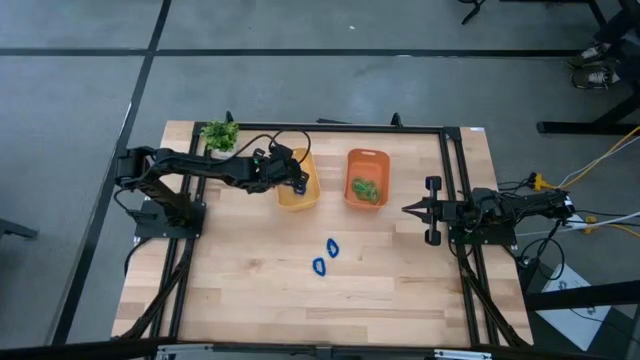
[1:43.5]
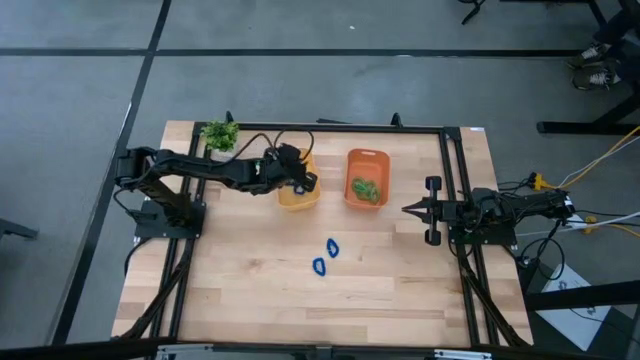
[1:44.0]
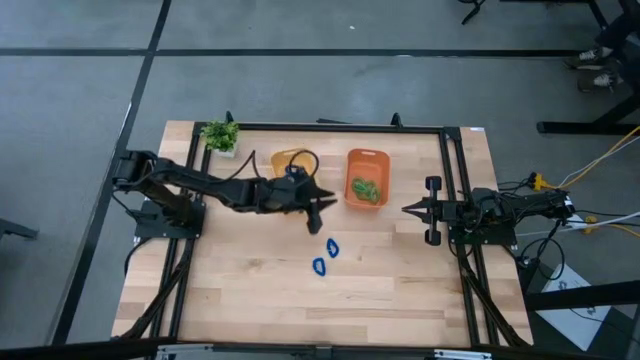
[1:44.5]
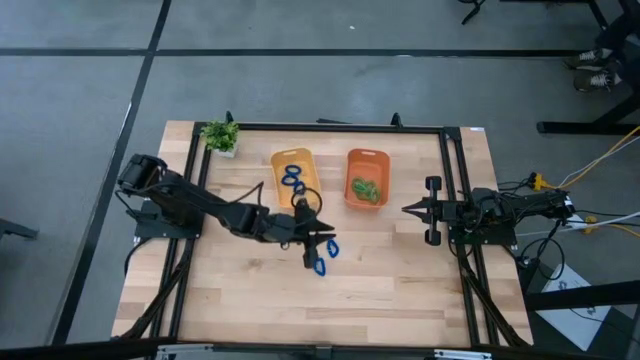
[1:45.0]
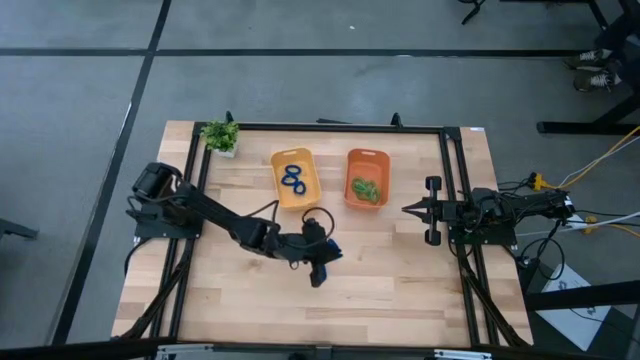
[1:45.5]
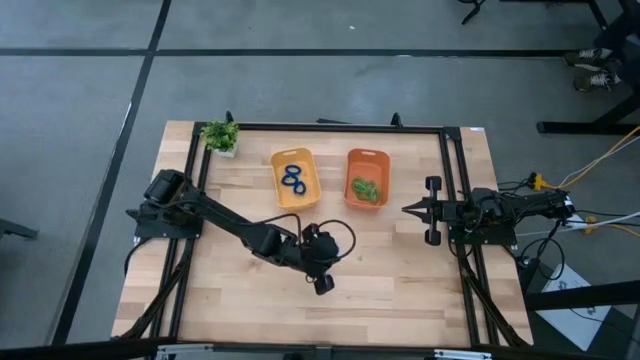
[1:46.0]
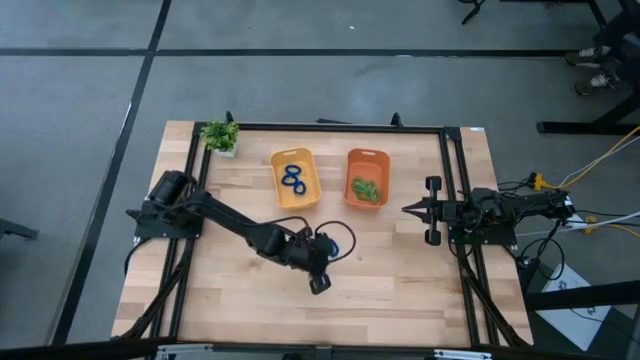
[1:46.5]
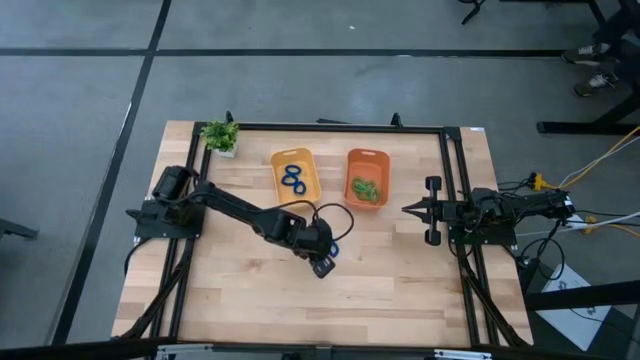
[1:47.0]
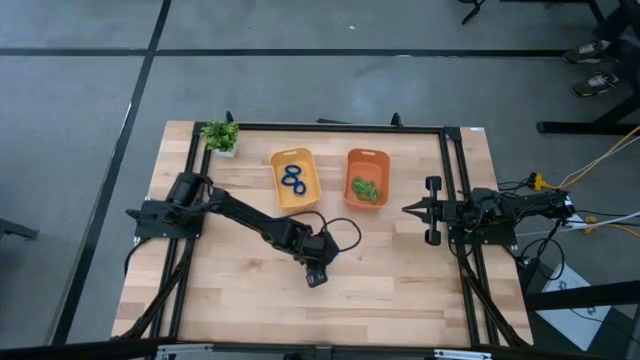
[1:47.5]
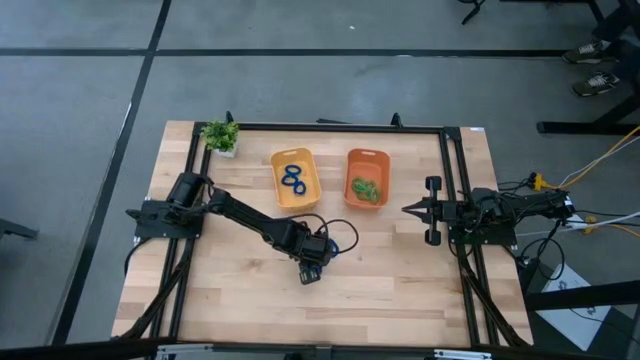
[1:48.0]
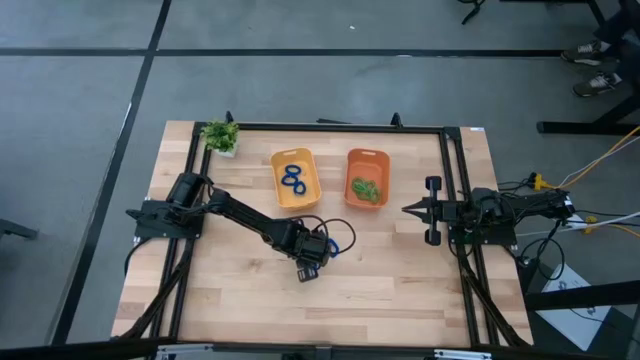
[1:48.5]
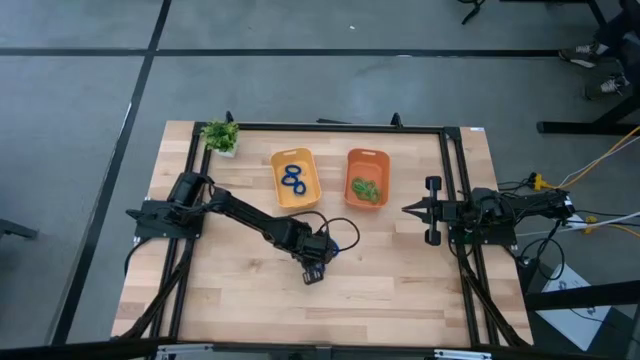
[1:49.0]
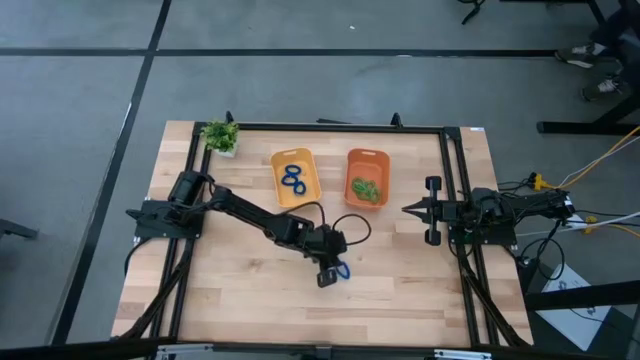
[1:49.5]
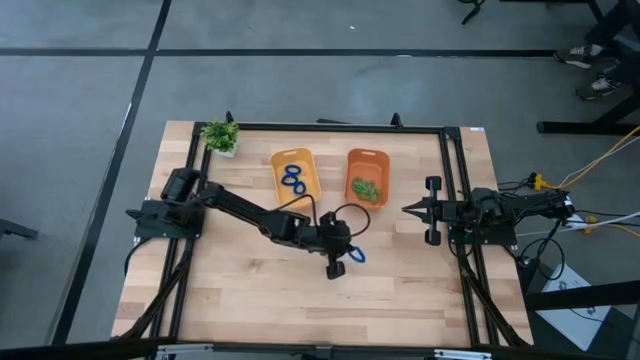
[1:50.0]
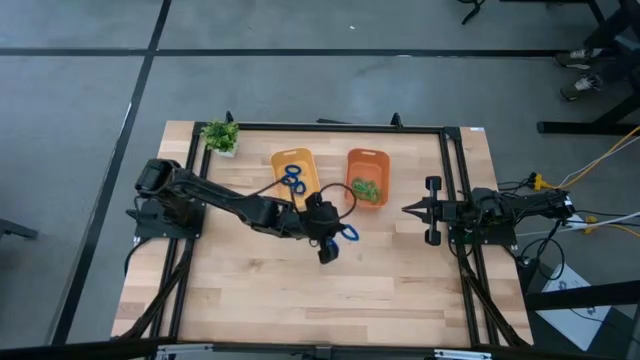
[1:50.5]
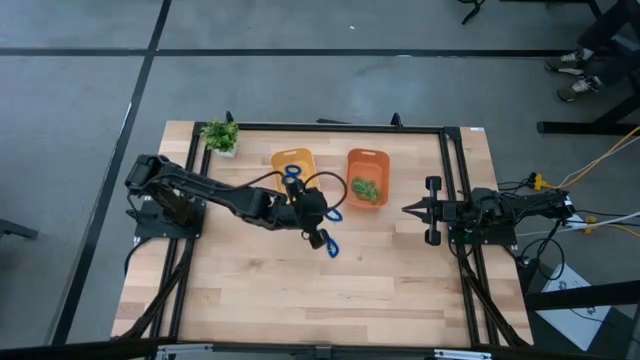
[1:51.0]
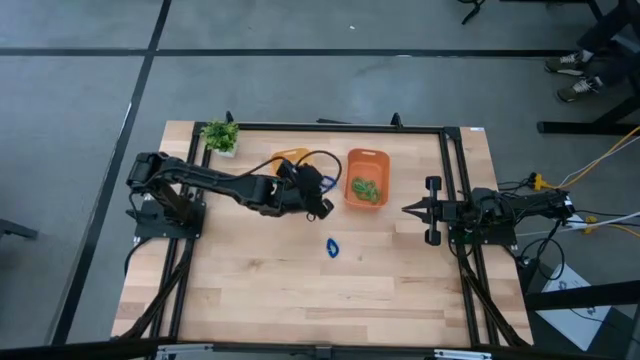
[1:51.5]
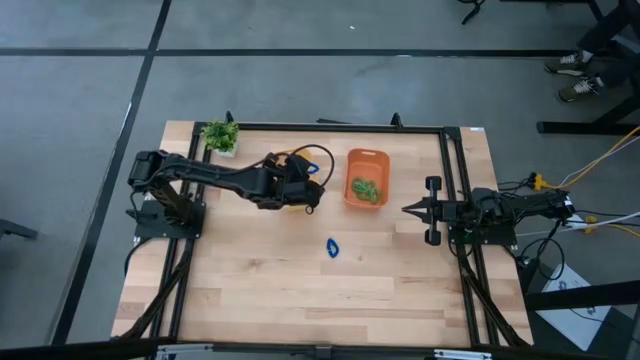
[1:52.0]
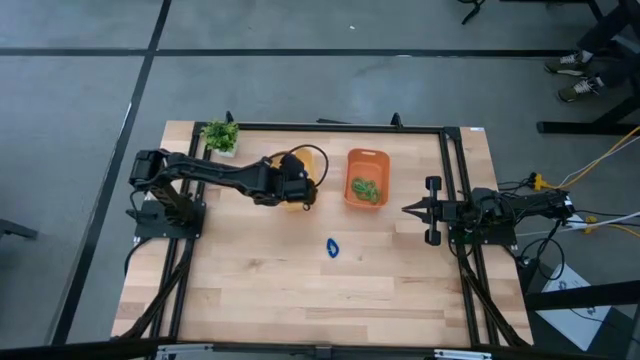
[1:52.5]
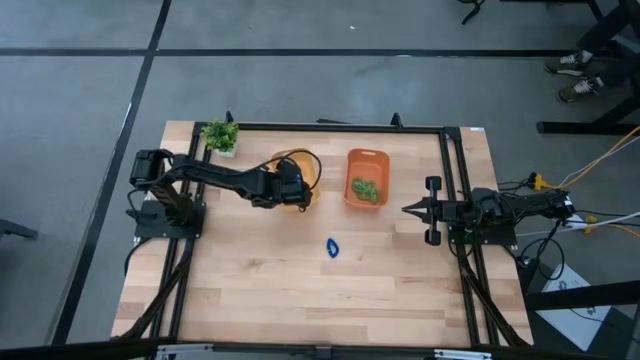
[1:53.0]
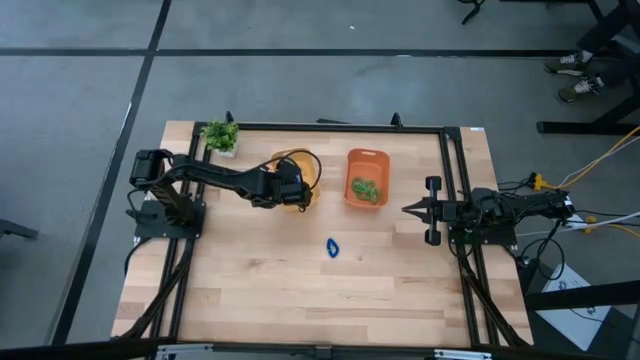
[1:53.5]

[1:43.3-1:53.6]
Task: Sort spring keychains
Put the blue spring keychain into the yellow bin

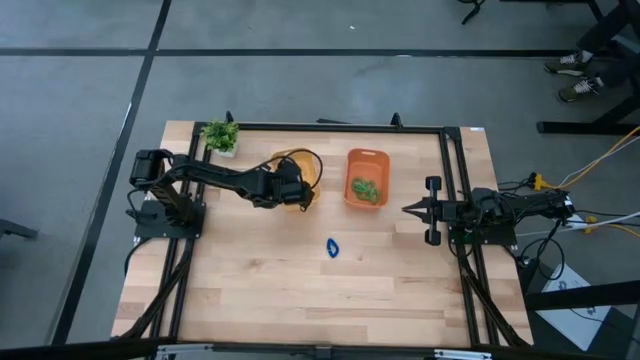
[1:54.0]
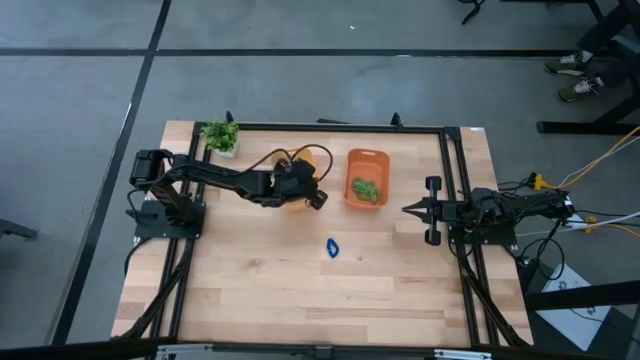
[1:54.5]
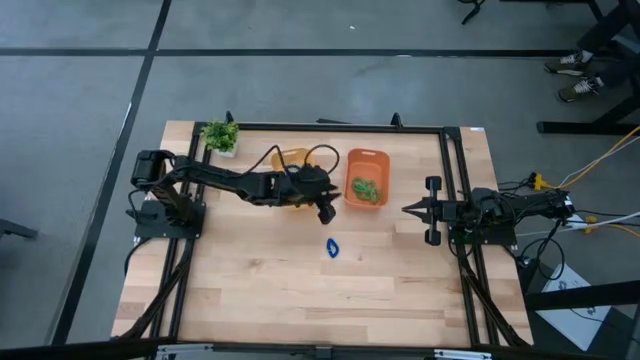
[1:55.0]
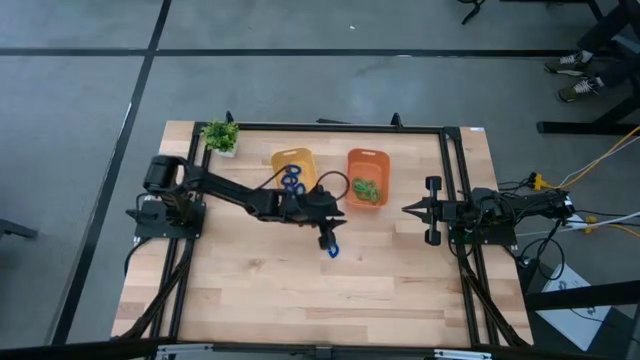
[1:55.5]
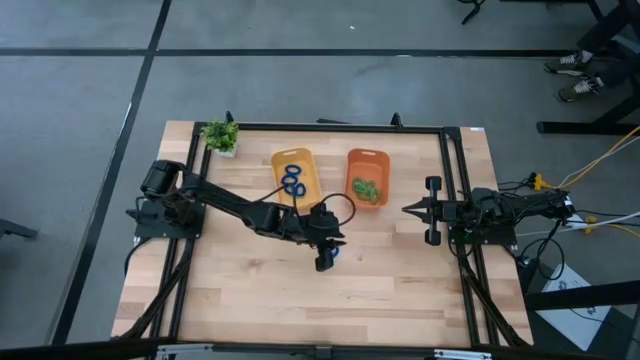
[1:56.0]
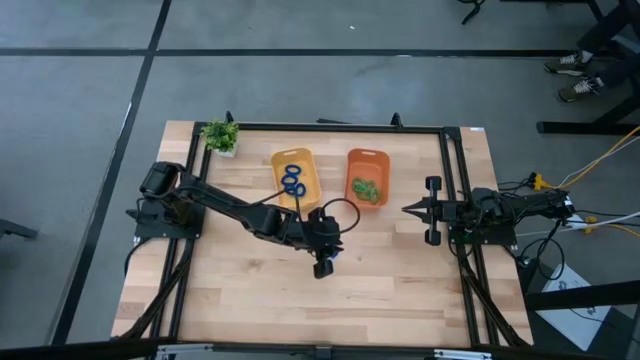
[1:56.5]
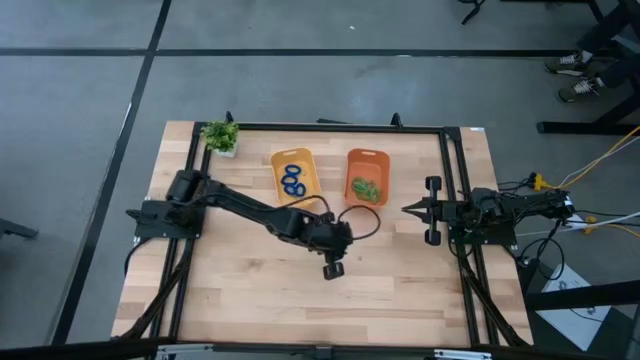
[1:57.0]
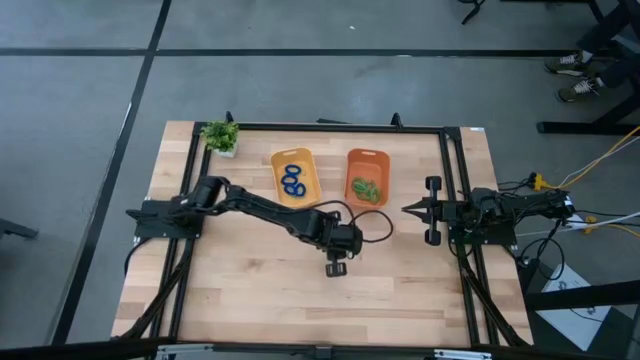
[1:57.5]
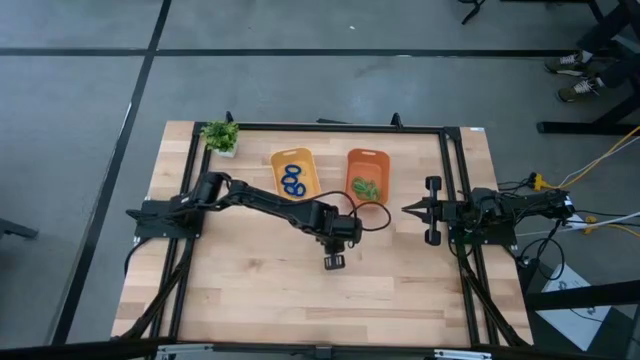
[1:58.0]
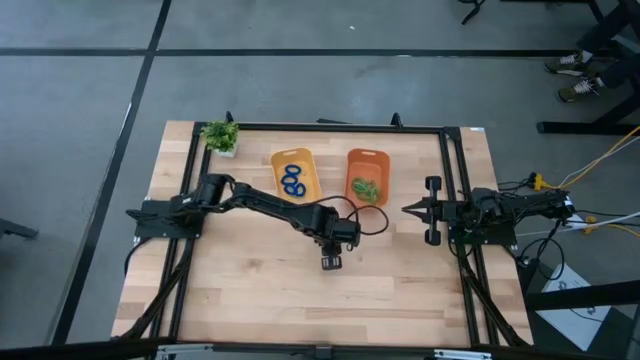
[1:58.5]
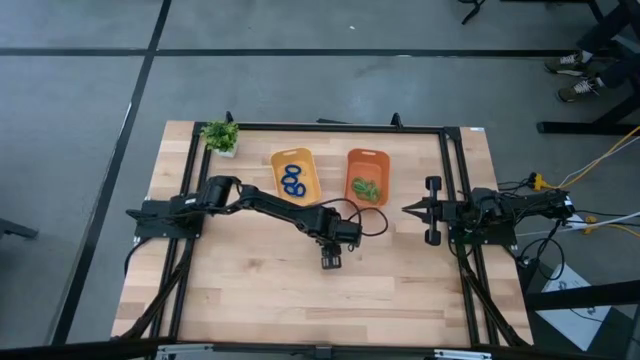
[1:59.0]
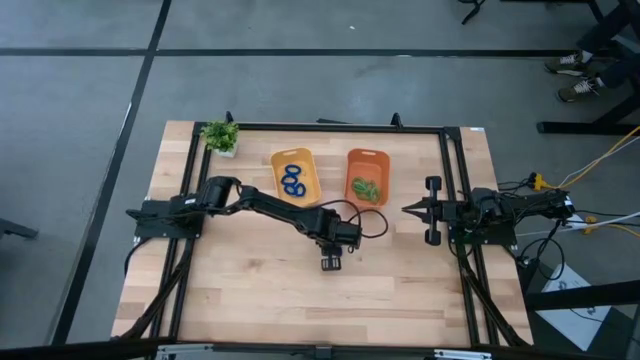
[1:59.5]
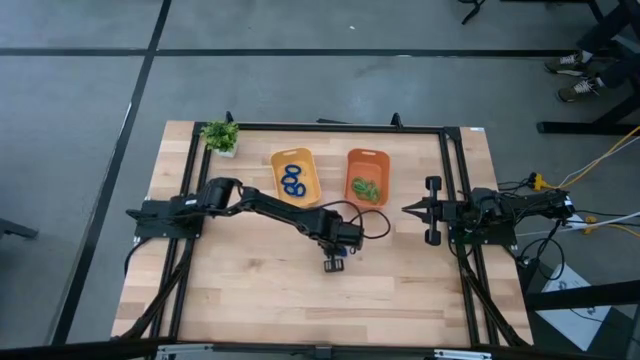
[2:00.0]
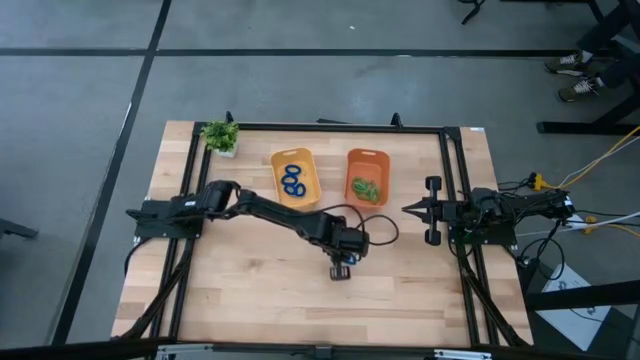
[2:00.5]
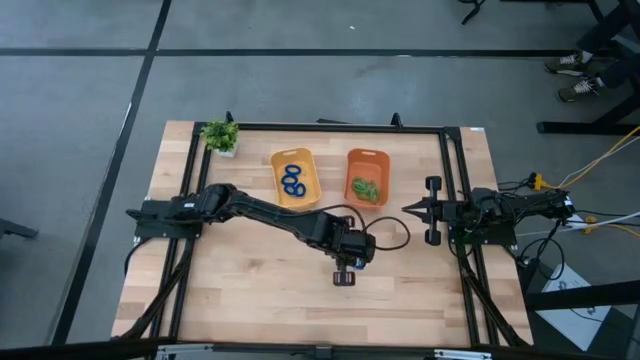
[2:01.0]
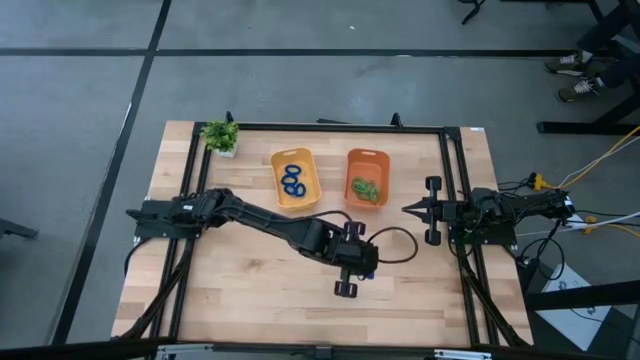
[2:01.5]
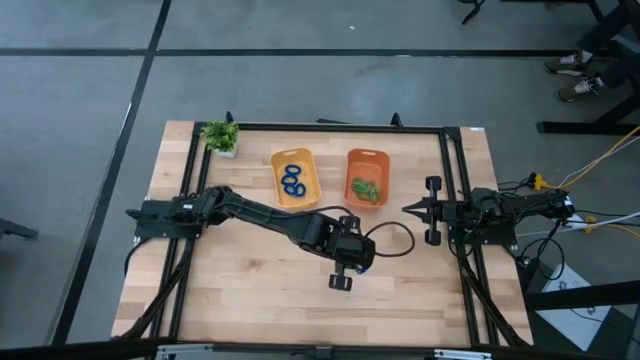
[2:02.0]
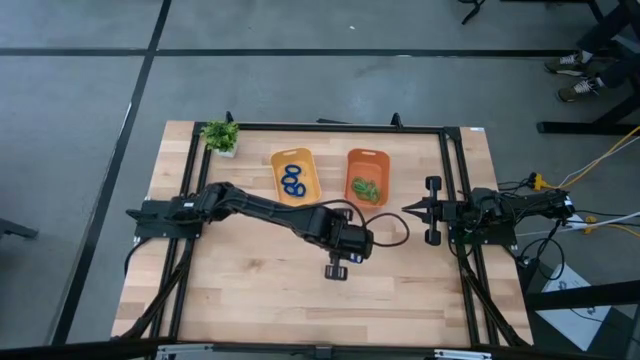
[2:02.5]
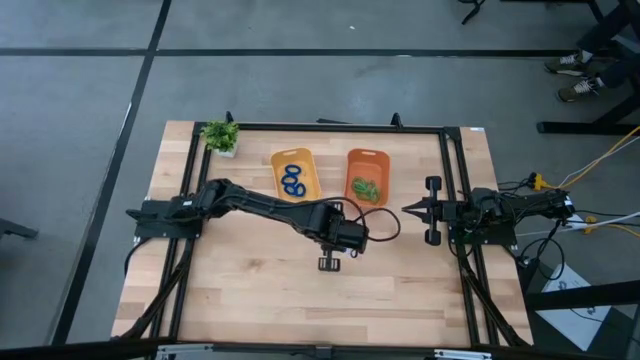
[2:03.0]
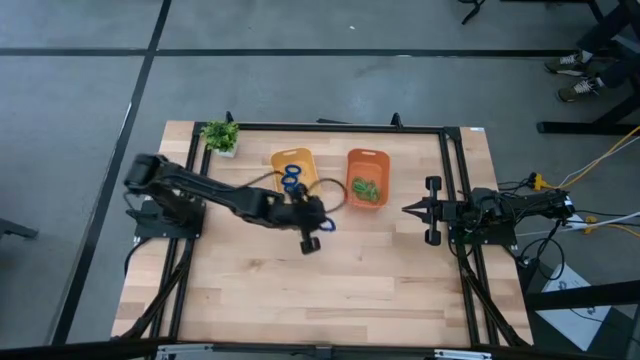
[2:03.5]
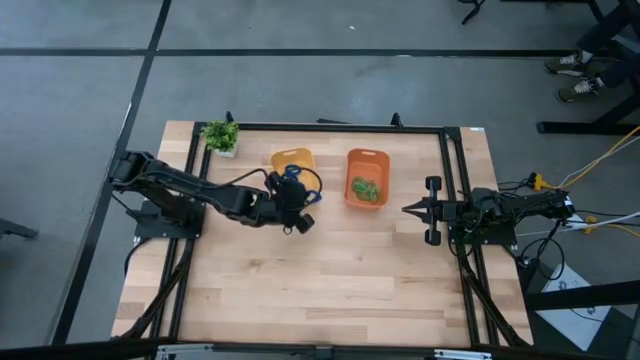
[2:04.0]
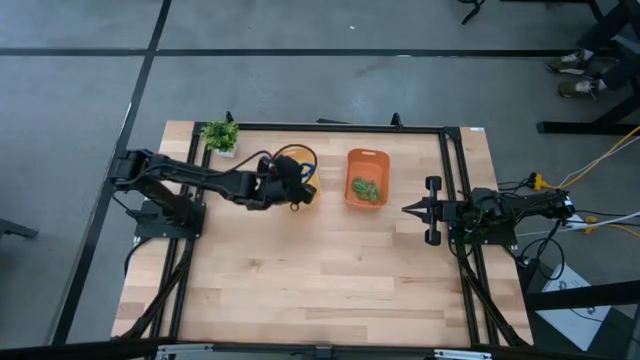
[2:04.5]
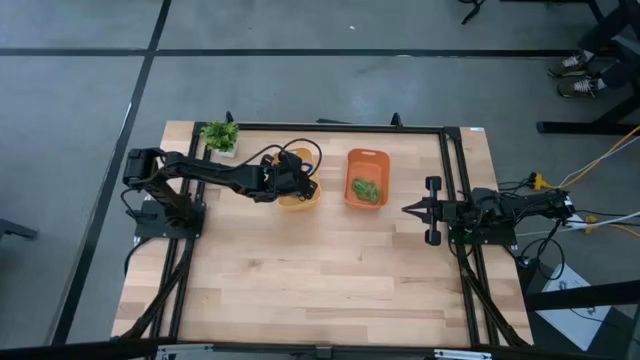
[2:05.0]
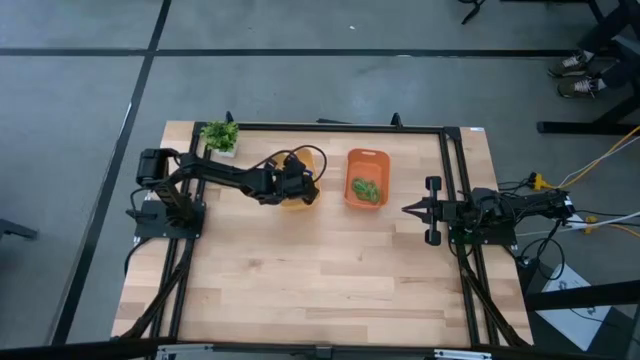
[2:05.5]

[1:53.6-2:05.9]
Put the blue spring keychain into the yellow bin
